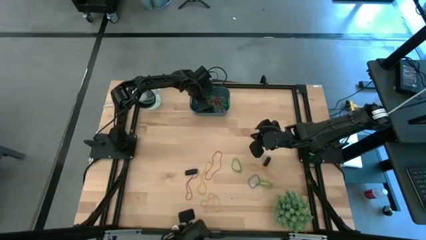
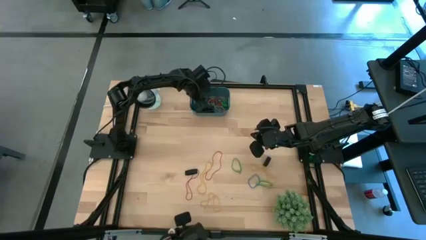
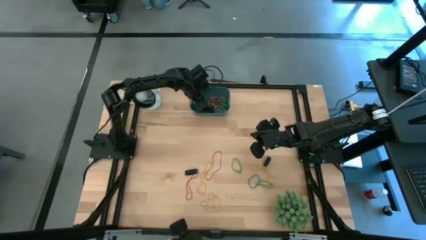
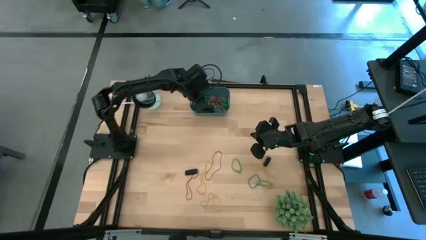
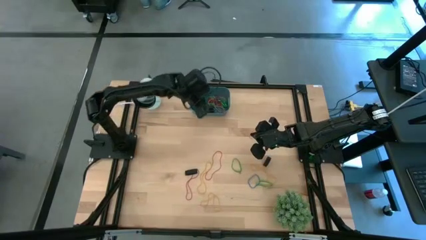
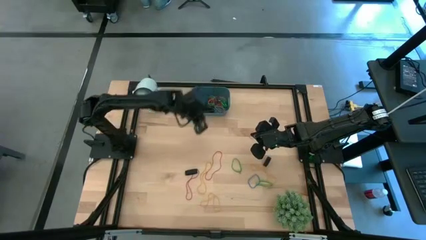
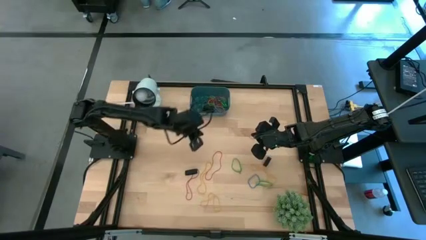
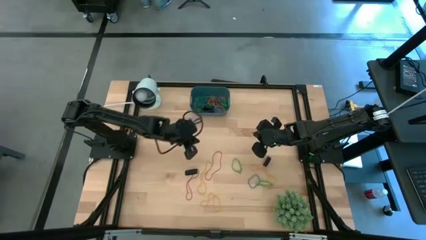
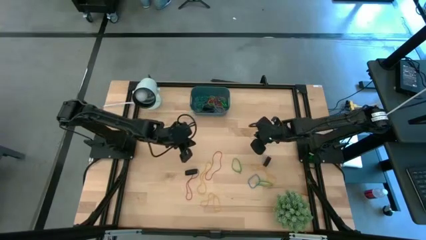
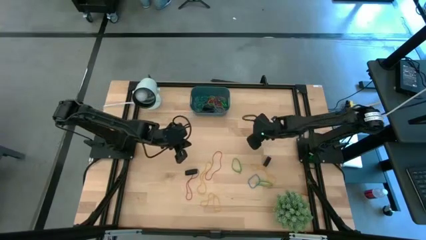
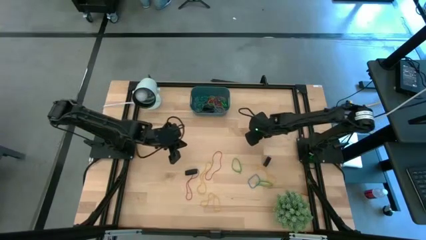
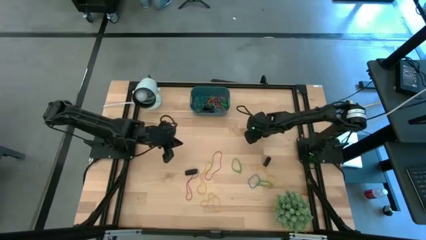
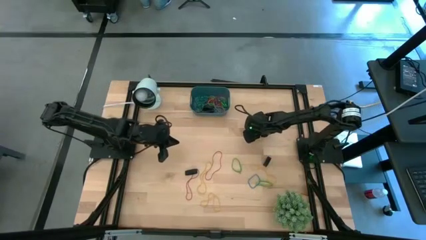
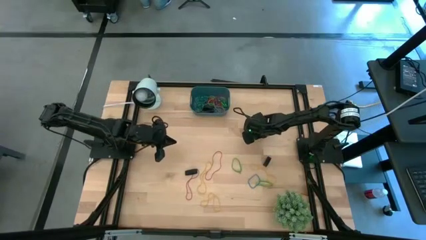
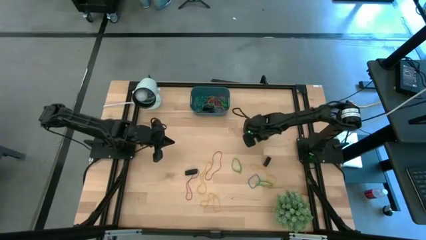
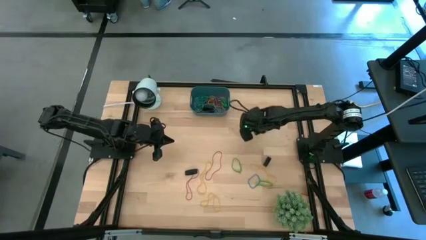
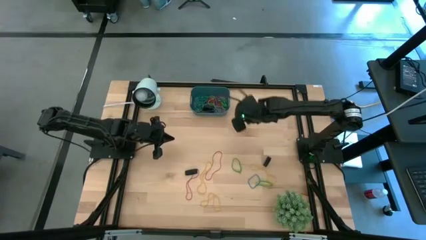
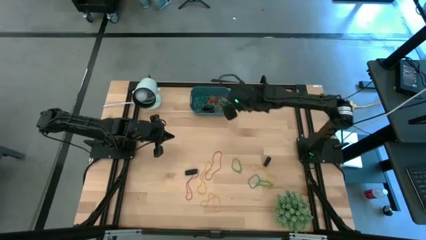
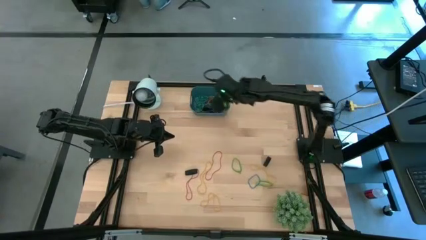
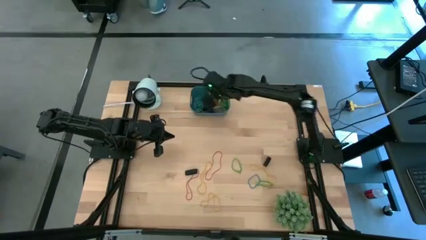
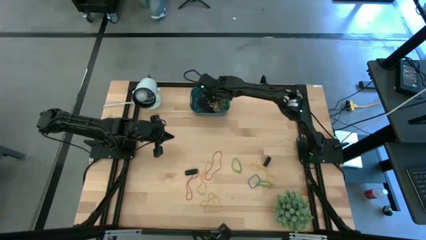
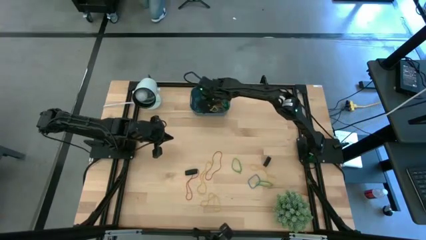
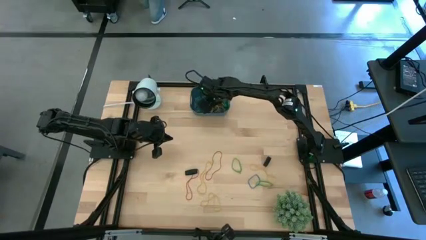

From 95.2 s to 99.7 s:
Task: Pick and place rubber bands into bin
Put the yellow rubber band into the blue bin

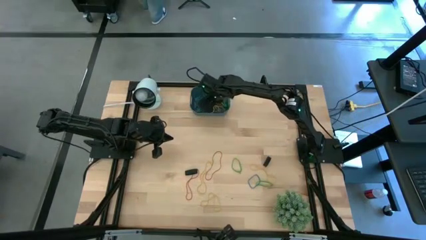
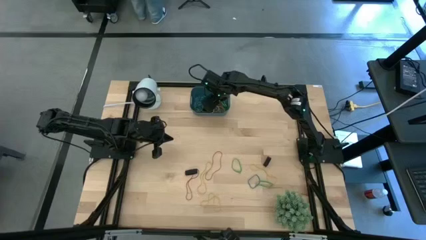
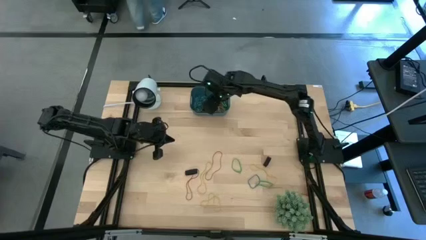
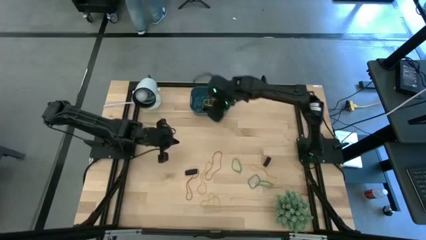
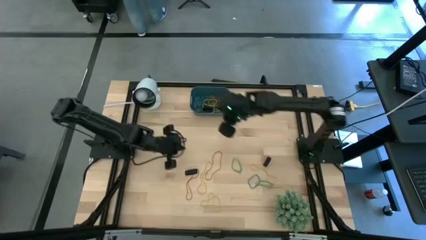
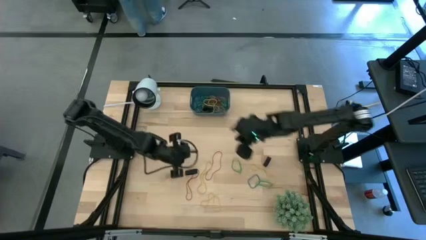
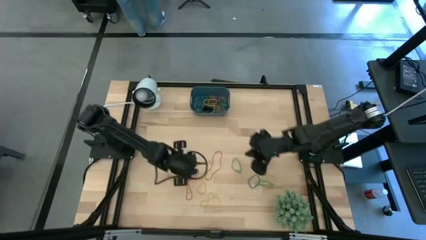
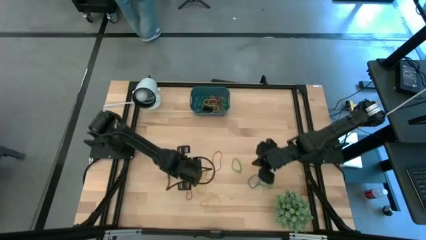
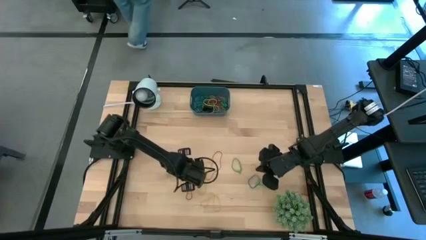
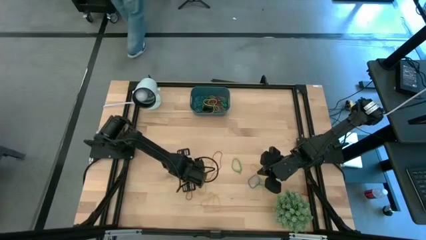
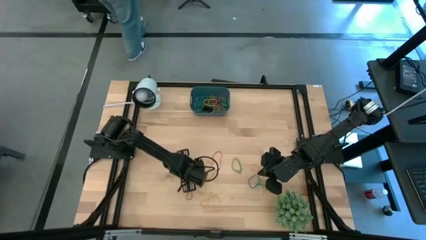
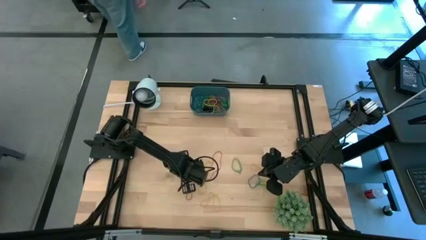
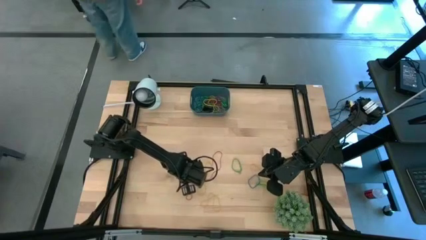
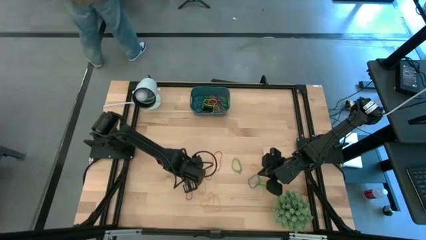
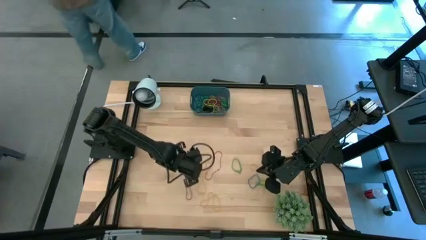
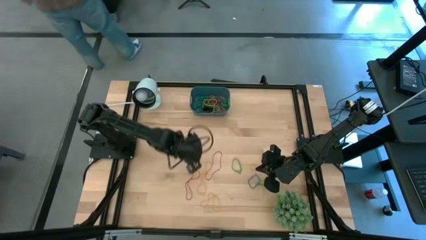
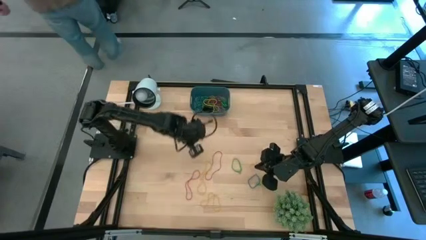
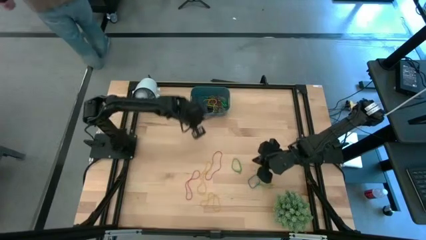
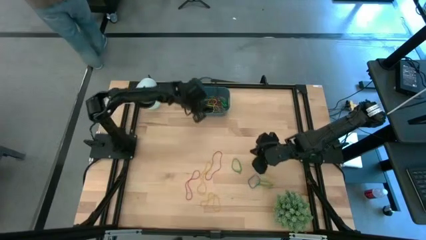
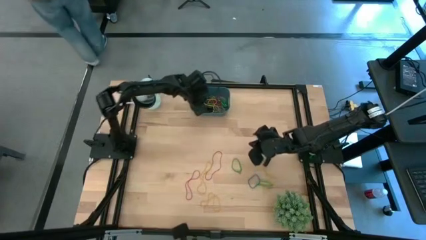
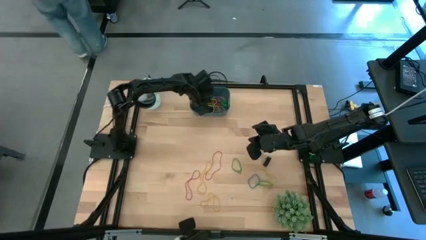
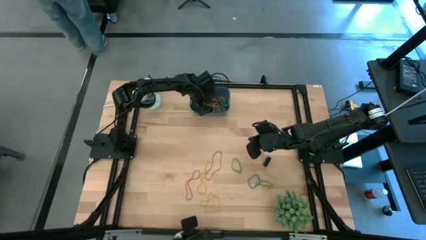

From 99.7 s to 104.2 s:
Put the black rubber band into the blue bin

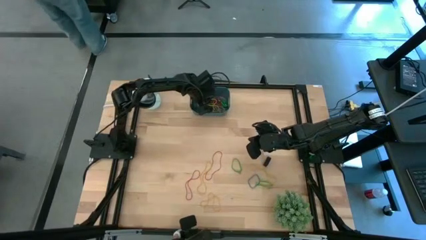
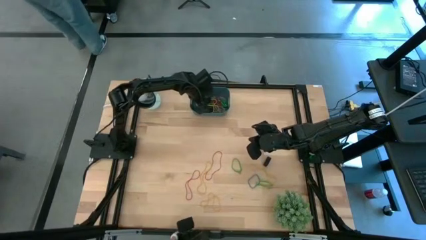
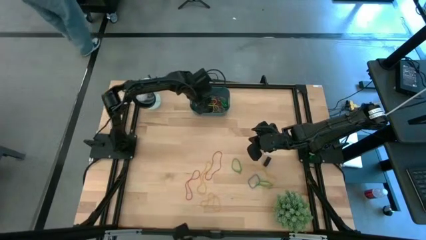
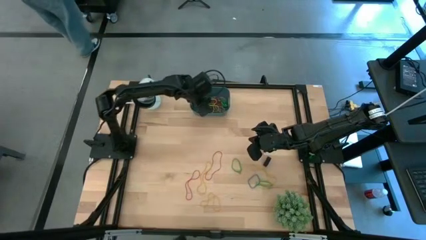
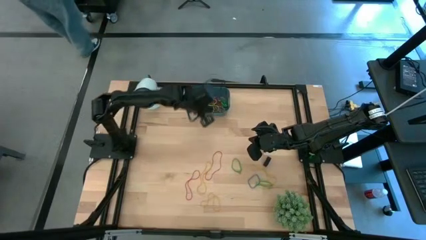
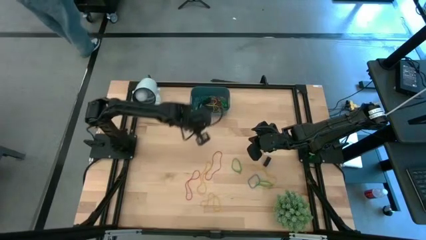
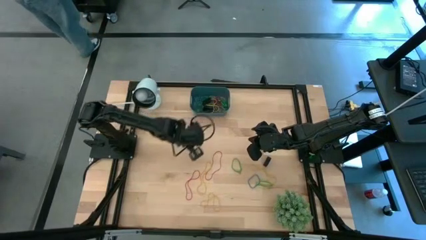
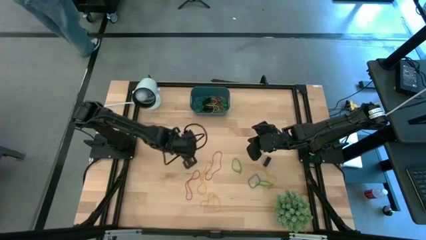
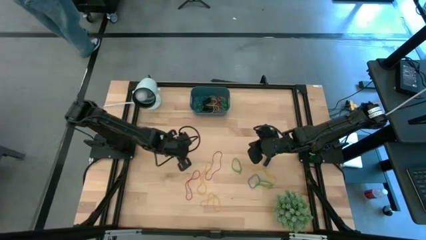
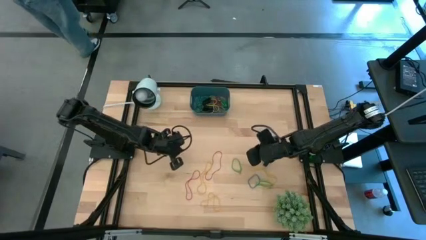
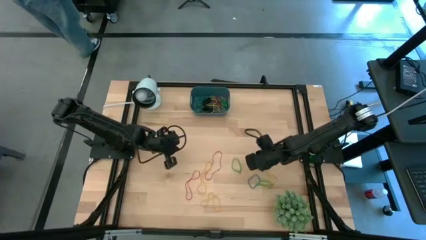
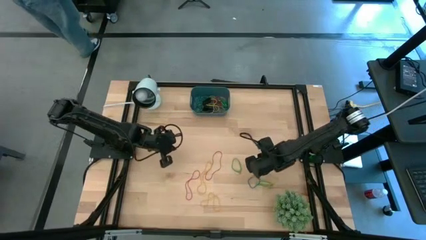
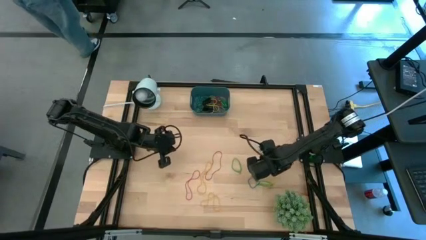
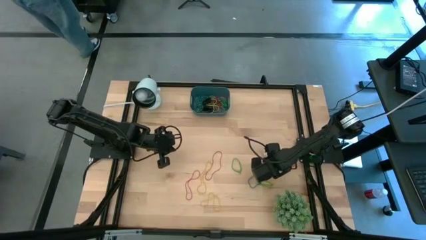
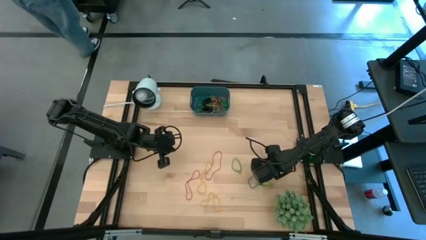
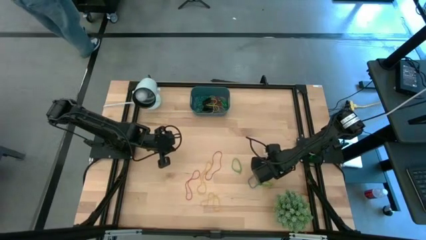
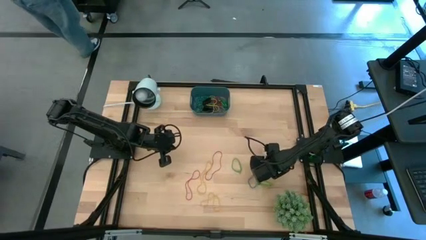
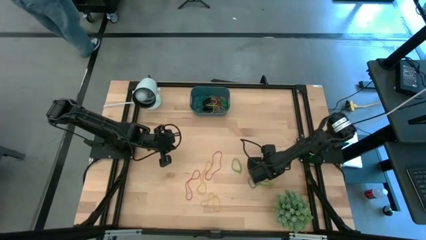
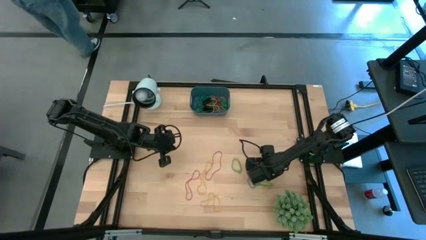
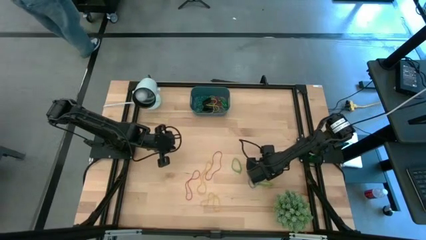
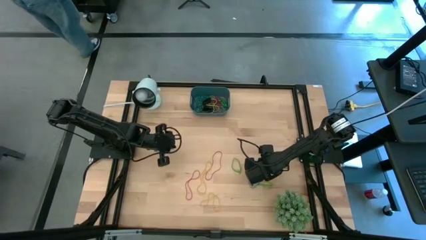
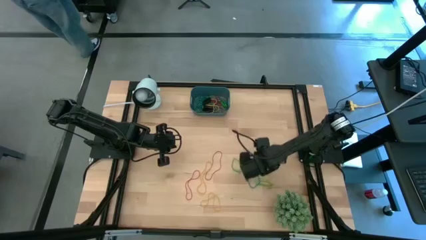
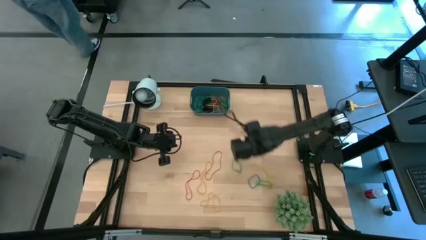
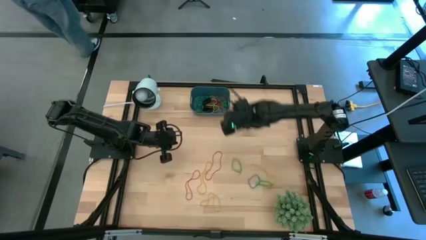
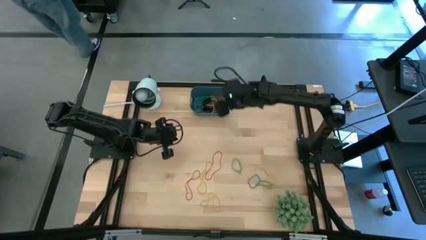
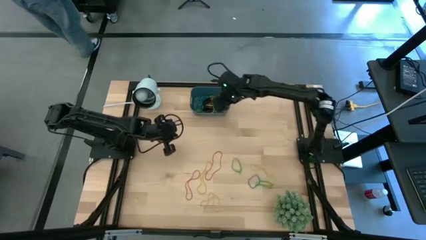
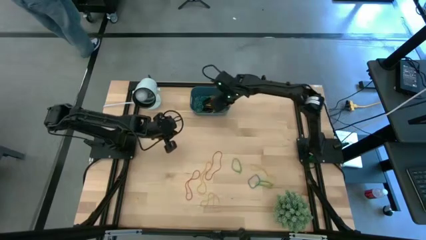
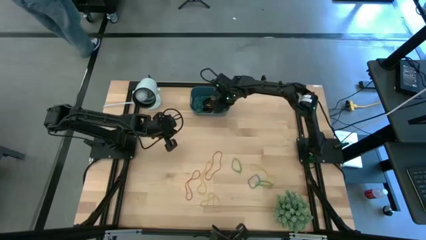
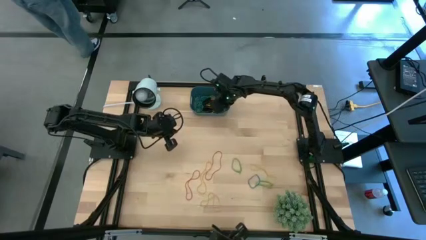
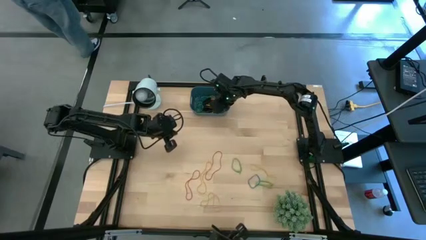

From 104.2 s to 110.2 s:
Put the black rubber band into the blue bin

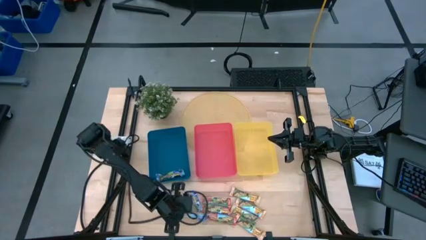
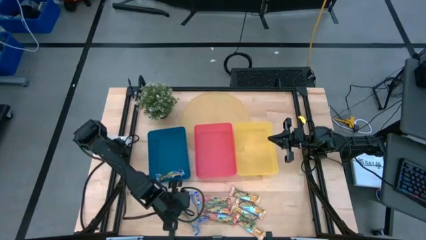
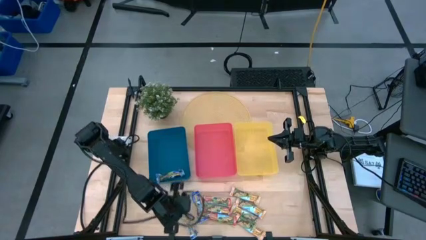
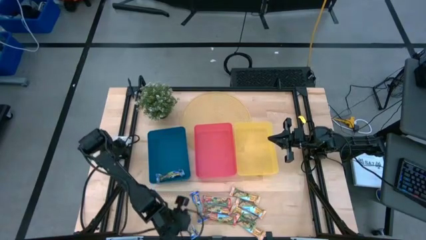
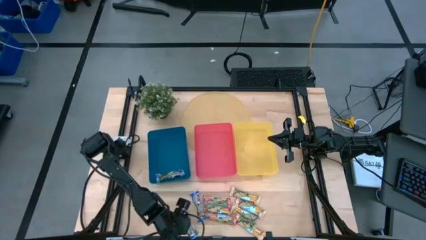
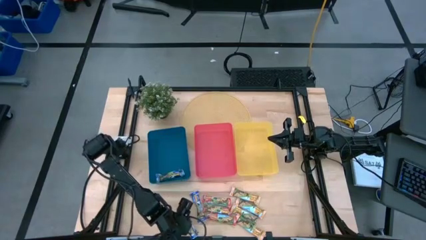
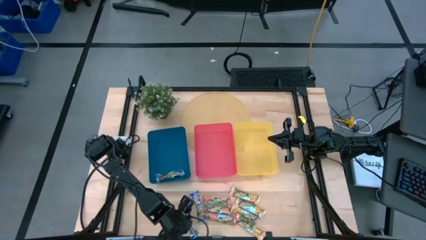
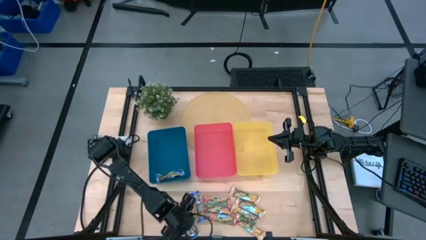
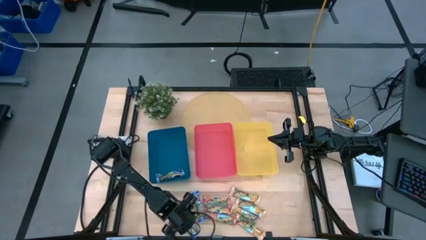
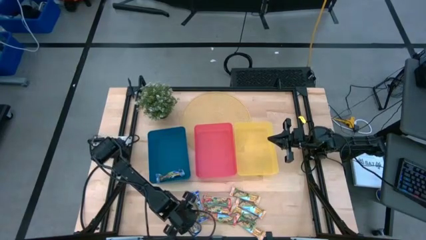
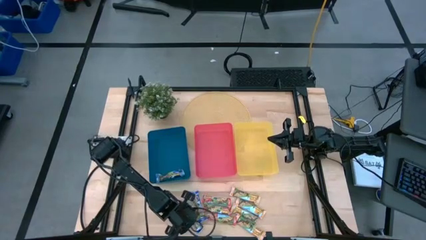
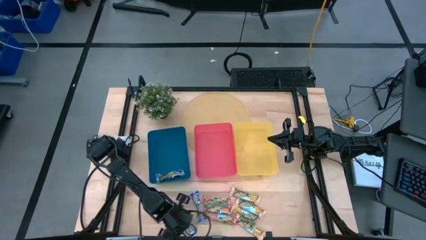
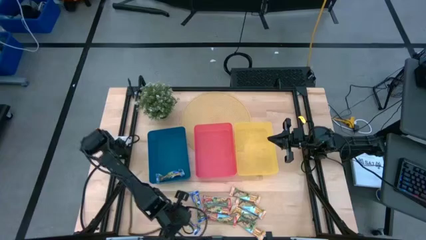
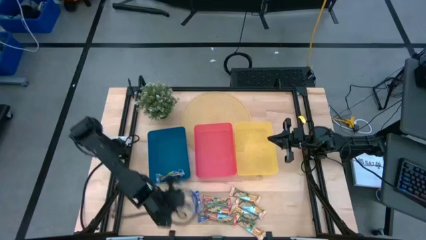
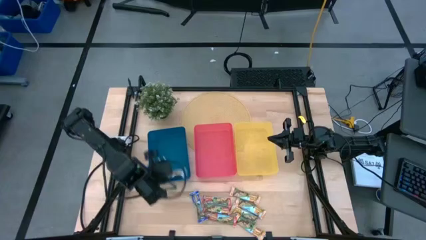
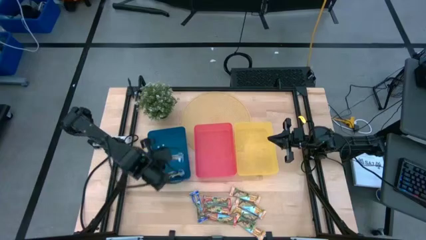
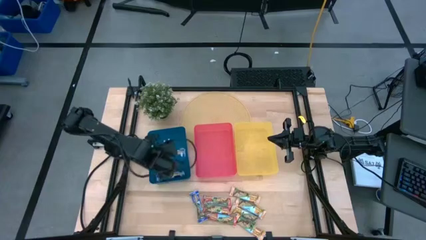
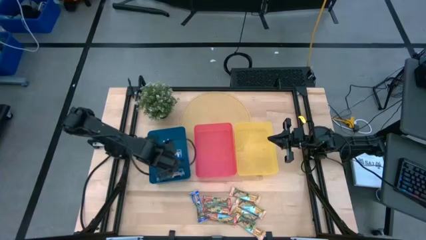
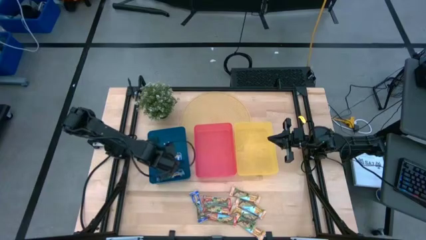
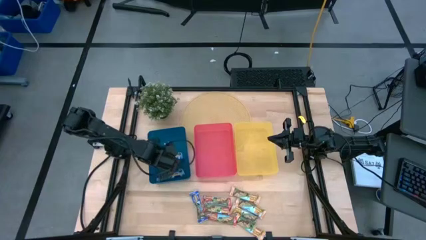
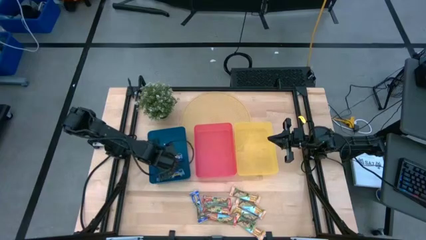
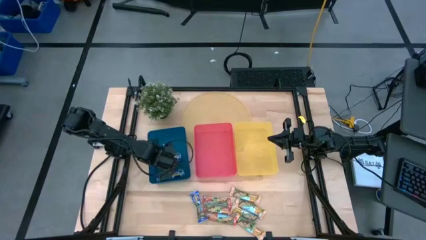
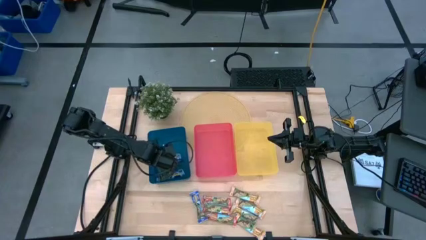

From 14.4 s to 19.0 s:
Task: Pick and place Granola Bars by type
Put the blue granola bar into the blue bin
